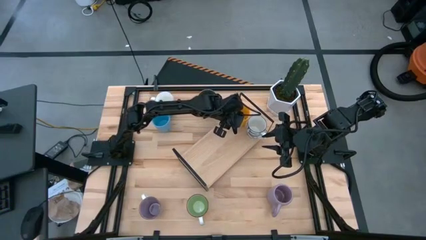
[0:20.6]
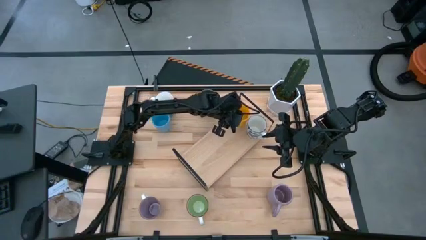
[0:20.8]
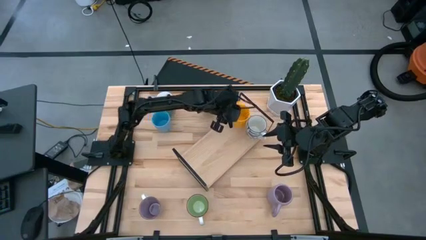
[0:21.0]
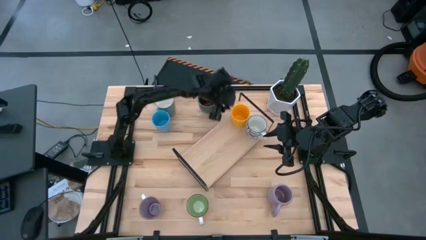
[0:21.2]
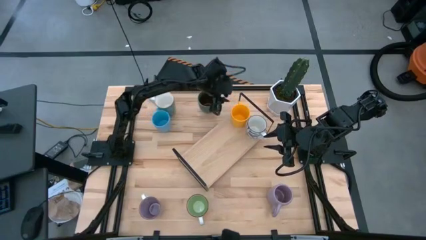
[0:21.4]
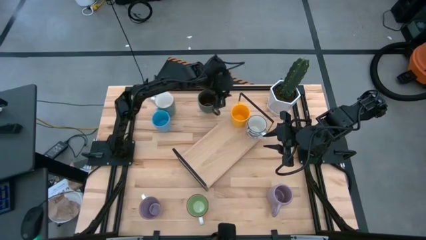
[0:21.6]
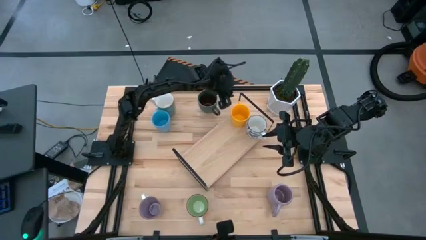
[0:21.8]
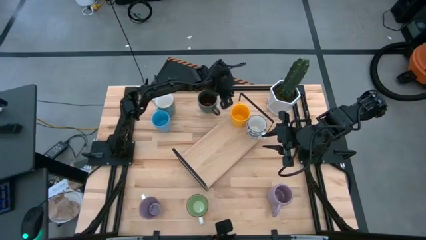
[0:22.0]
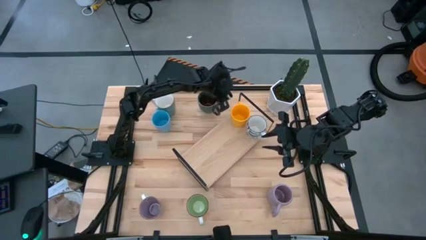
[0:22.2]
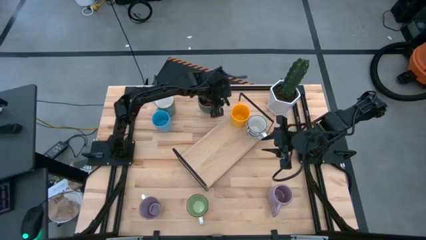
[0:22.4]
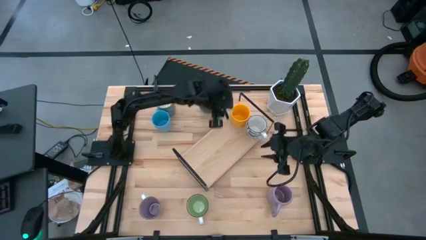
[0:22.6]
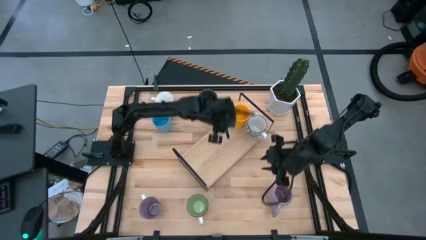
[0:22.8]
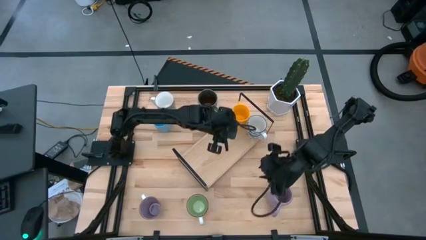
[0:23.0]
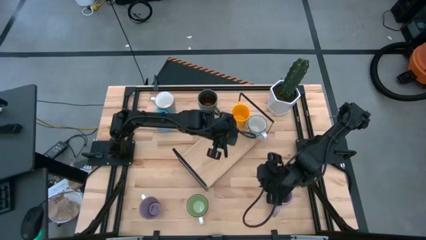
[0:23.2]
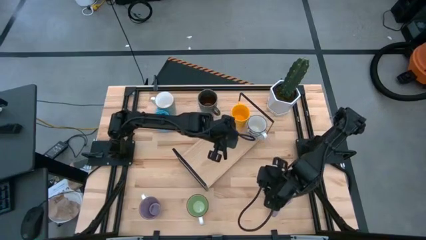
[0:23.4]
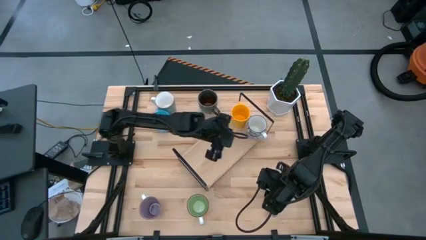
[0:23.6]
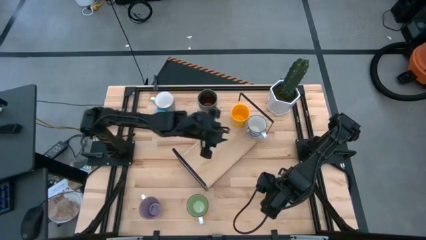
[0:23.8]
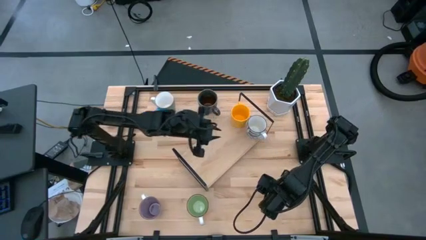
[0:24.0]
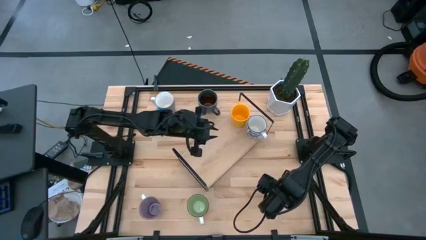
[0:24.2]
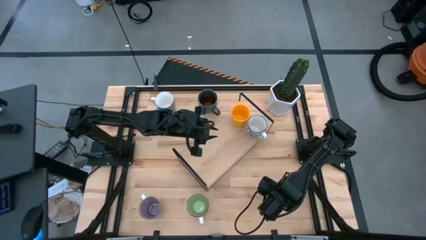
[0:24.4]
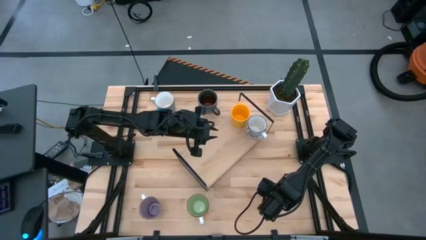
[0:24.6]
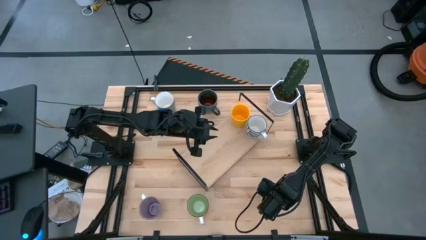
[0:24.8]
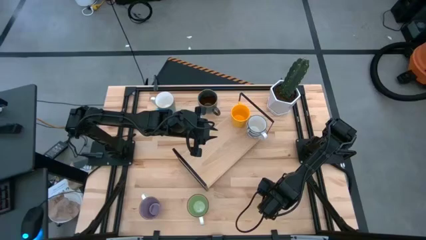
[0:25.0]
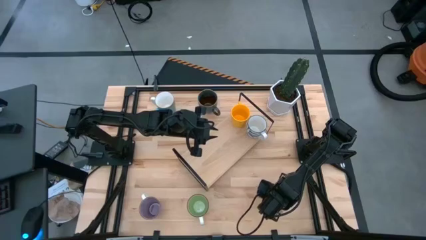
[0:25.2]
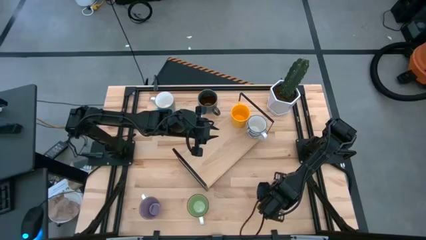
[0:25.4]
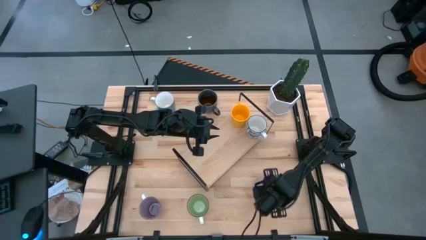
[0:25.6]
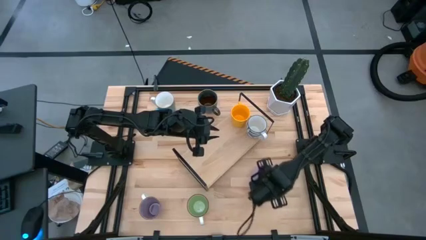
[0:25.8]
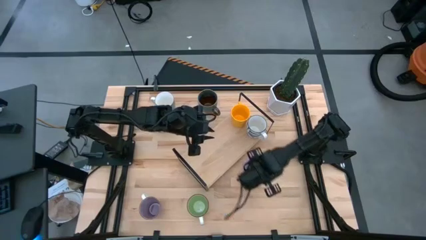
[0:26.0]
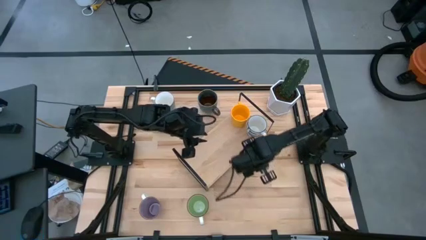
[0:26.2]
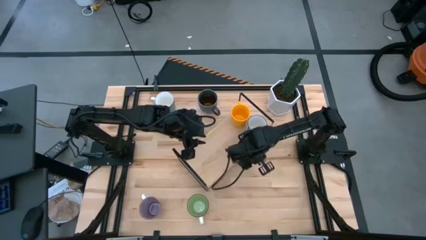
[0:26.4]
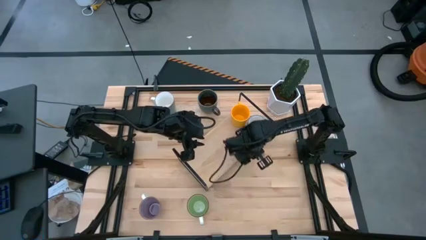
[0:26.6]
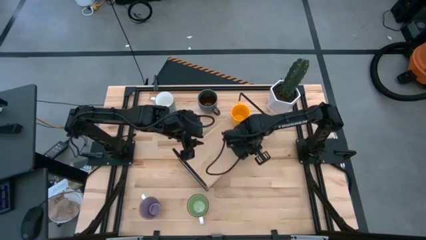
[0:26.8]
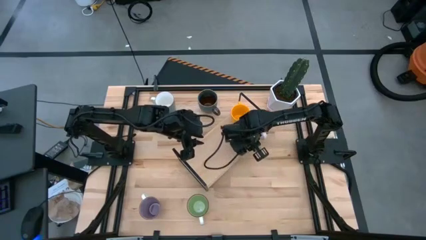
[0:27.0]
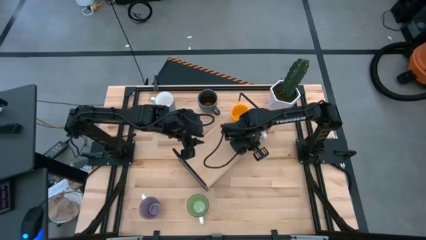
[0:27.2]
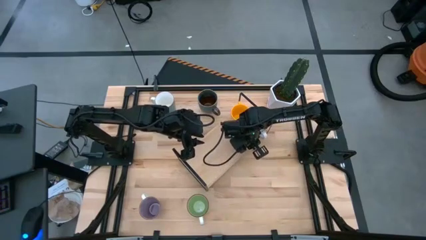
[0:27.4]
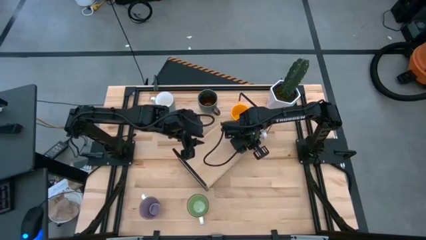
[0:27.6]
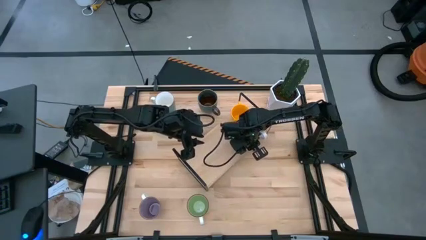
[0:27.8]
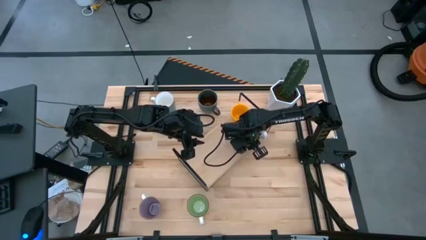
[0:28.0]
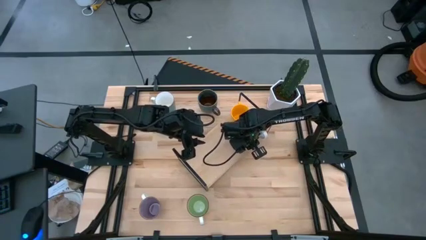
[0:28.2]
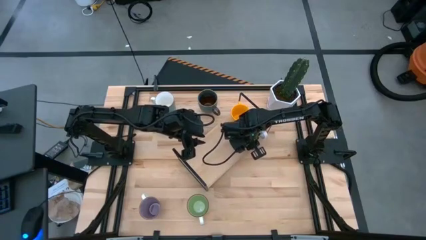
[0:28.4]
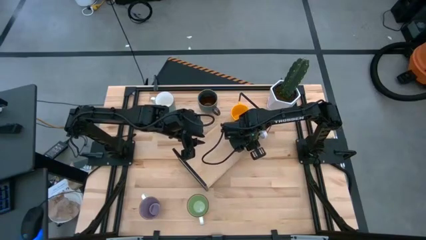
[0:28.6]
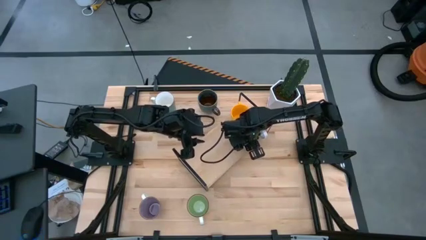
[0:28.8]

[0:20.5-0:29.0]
Task: Place coffee mugs
Put the right purple mug on the shelf

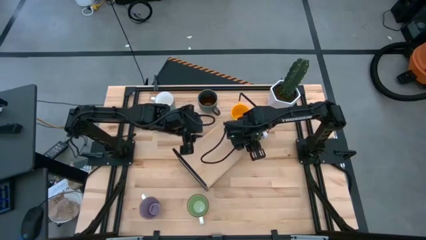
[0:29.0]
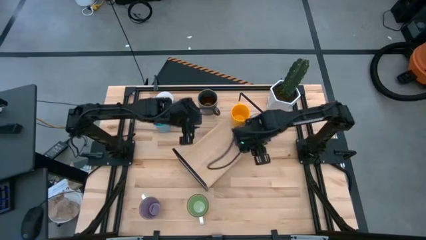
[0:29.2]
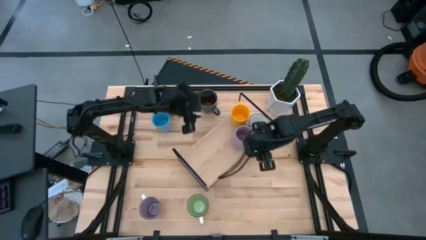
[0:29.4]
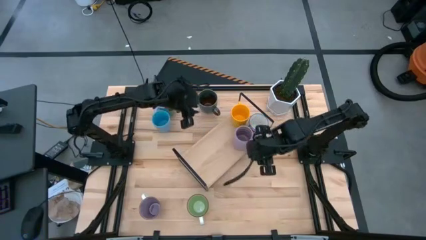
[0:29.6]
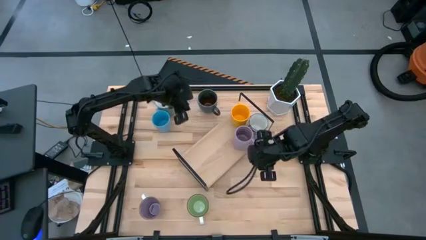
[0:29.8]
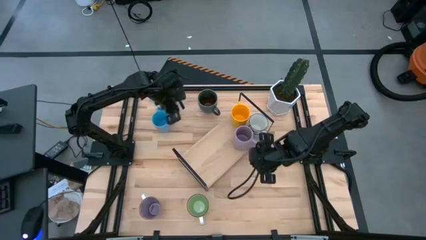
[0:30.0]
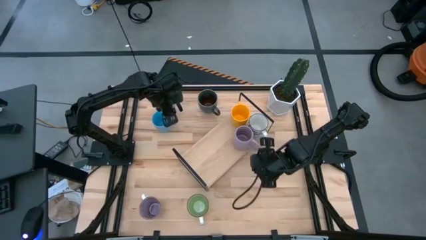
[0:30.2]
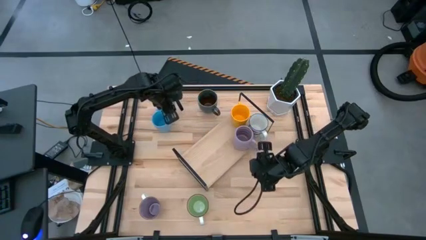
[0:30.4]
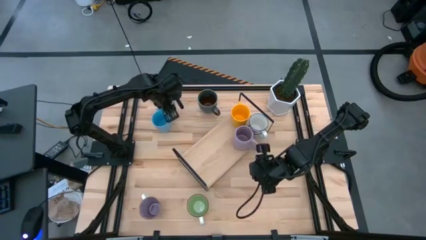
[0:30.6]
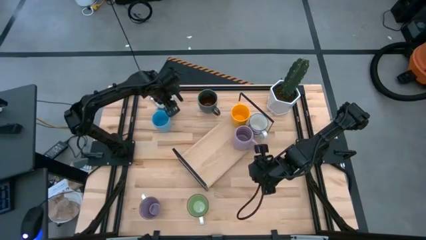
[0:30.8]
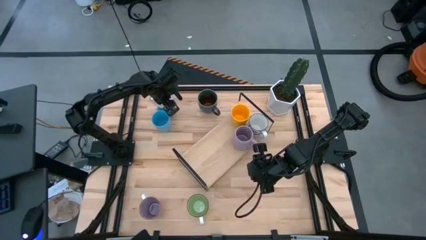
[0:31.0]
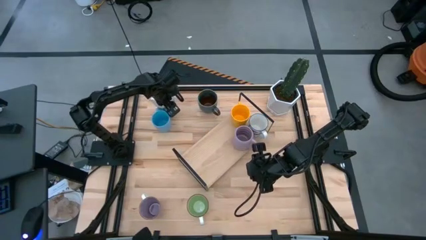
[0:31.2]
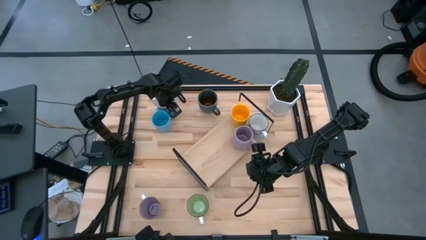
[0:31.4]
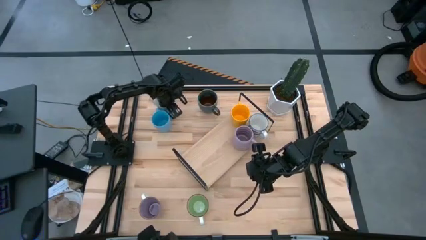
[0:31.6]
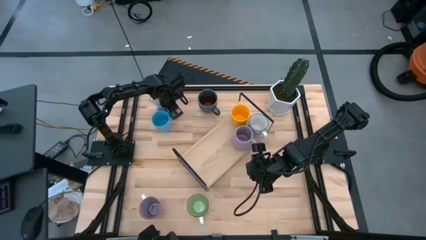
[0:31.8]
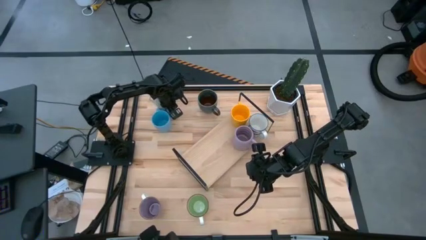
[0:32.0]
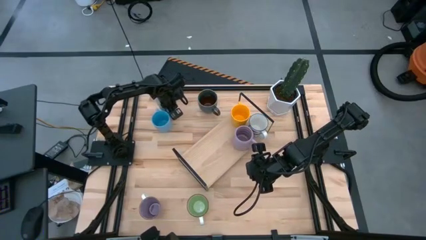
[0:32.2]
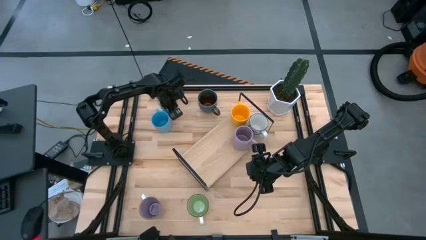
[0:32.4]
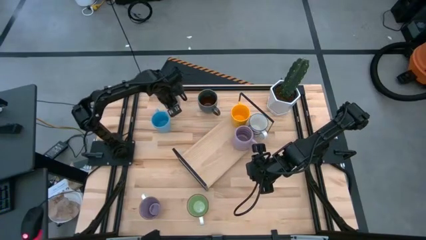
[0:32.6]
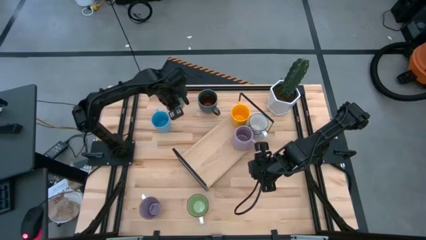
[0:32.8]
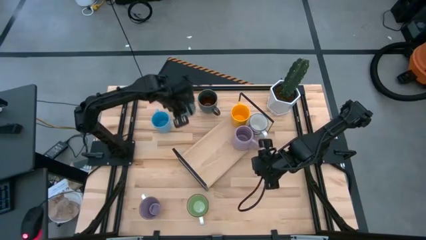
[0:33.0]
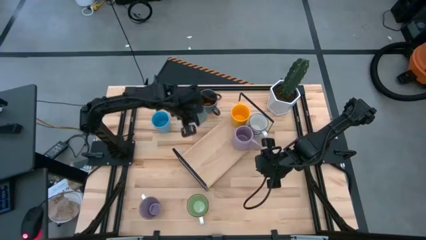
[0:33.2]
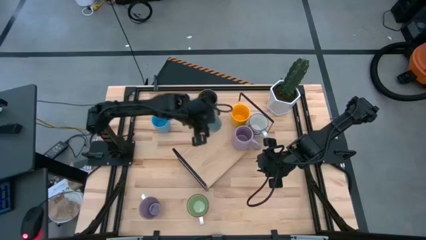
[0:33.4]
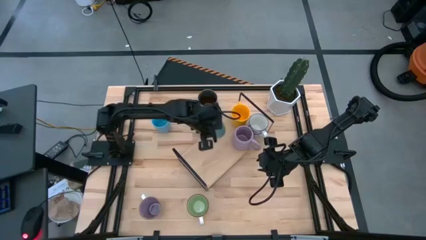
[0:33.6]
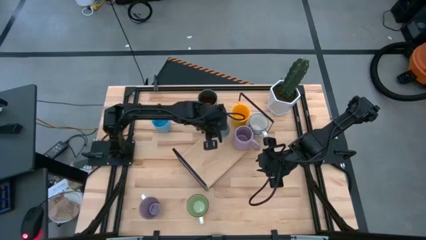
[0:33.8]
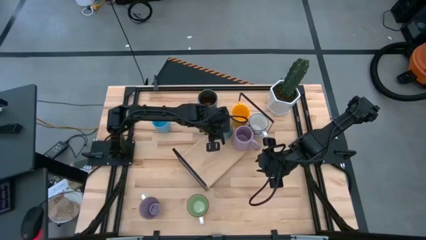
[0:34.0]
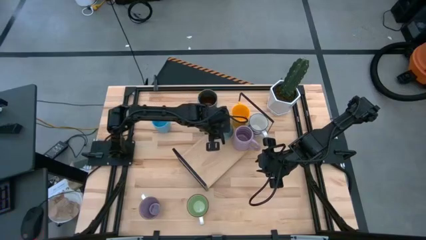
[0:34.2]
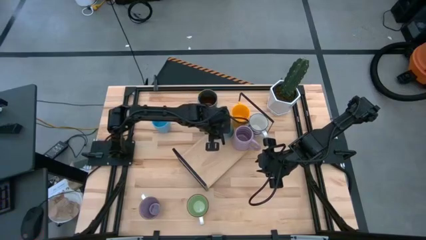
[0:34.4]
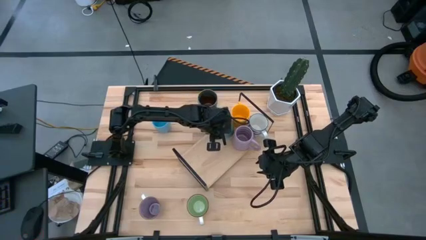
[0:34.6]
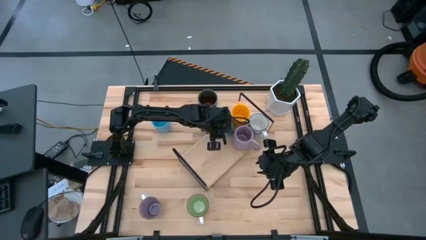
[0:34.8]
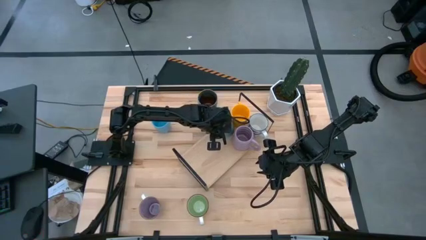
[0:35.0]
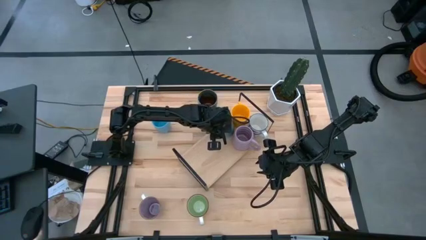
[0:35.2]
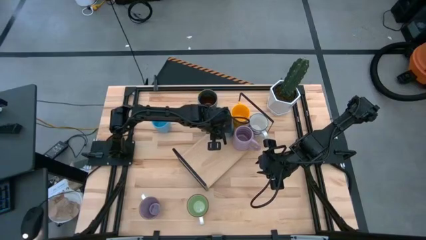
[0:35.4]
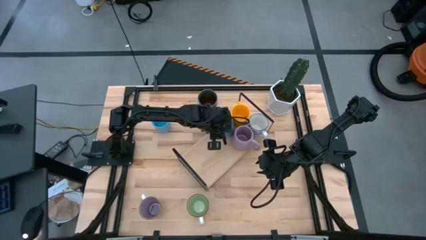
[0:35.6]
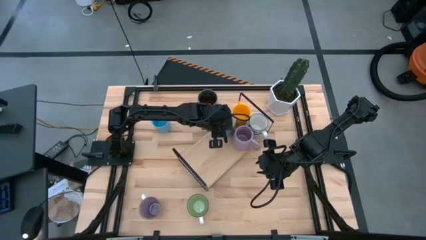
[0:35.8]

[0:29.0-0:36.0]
Put the light blue mug on the shelf

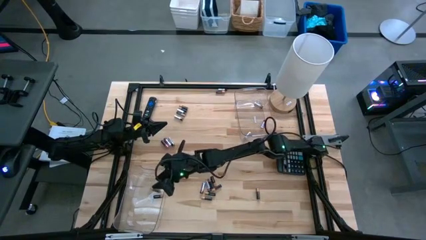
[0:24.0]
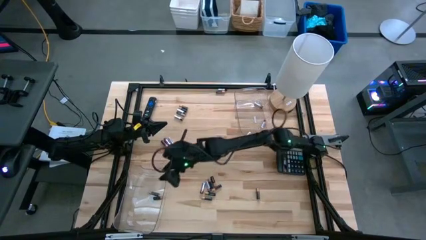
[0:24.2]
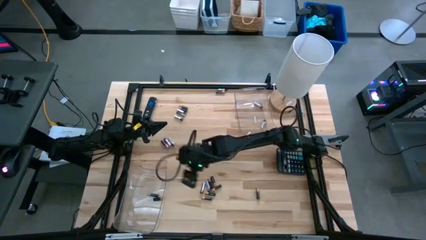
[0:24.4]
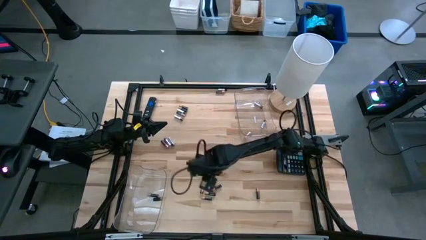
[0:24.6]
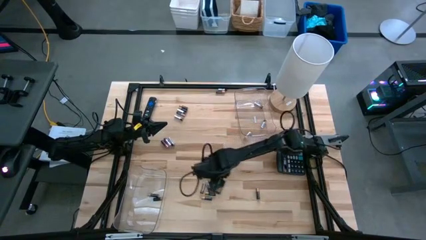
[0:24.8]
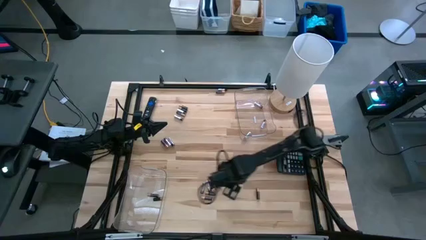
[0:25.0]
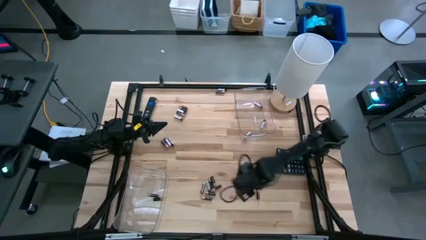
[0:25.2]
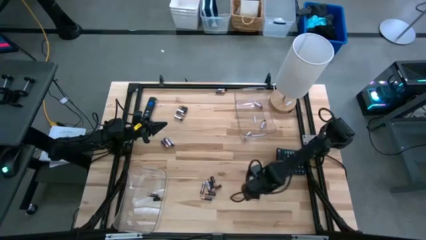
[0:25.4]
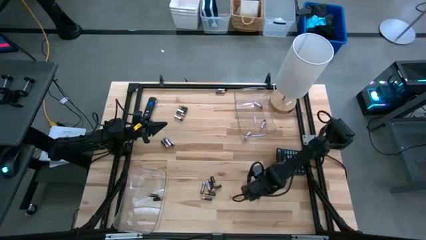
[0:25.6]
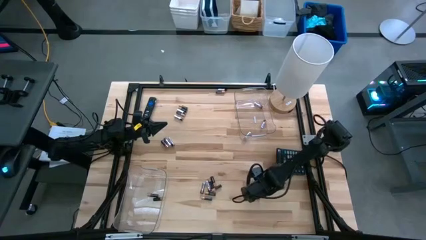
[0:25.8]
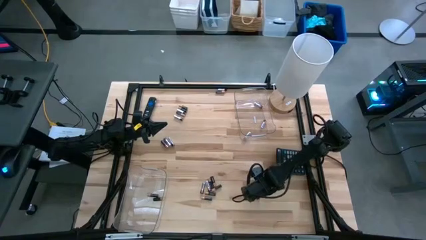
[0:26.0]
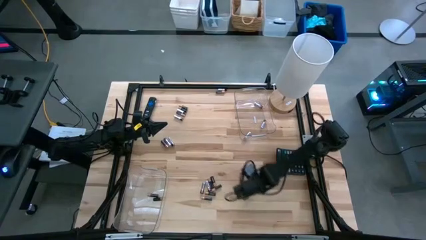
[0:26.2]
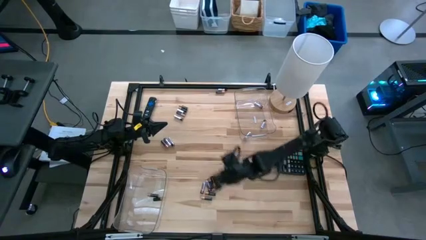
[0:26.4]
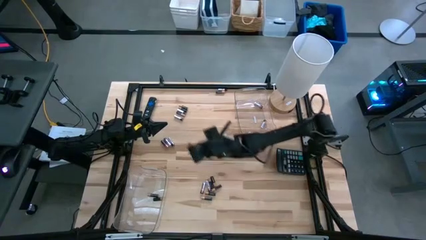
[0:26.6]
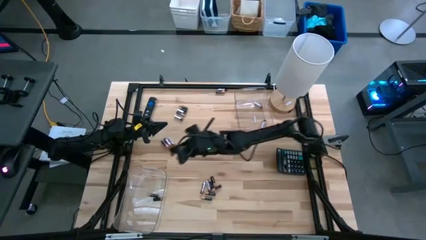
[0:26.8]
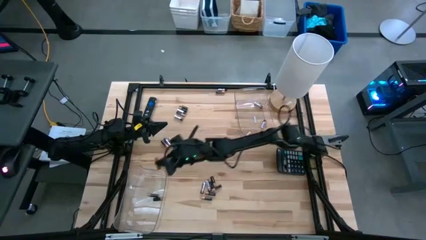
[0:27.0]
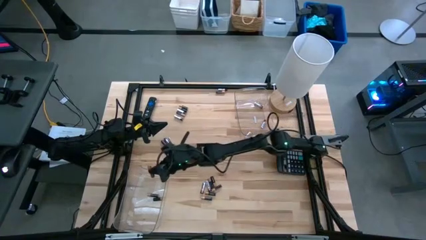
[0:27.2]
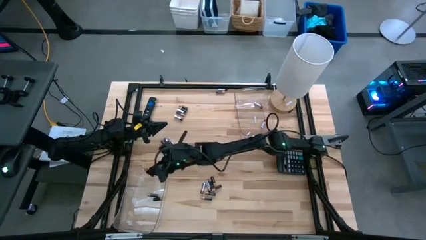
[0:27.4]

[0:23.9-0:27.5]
Task: Sort batteries
Put the brown battery into the left transparent bin
